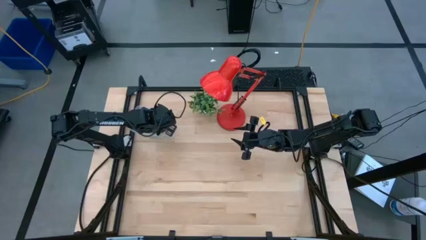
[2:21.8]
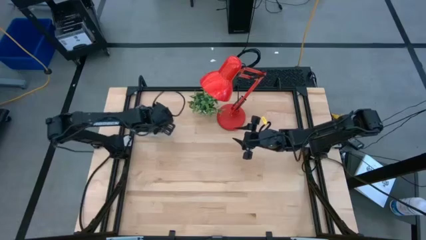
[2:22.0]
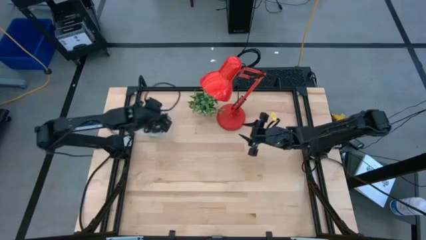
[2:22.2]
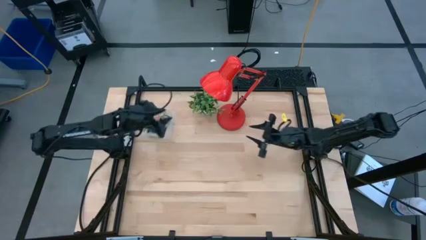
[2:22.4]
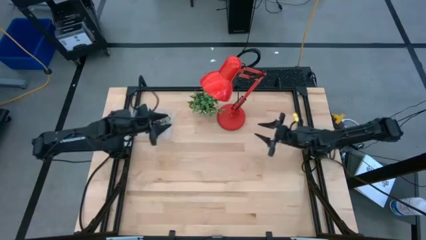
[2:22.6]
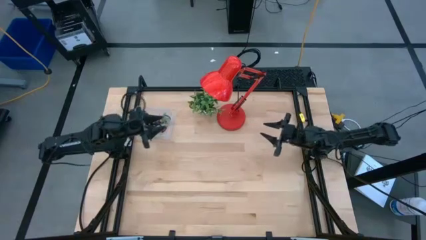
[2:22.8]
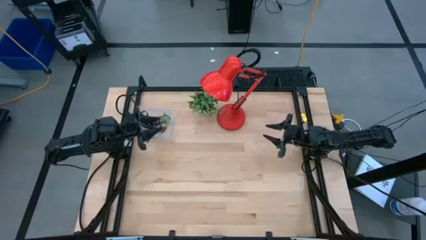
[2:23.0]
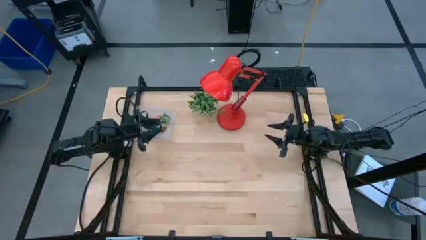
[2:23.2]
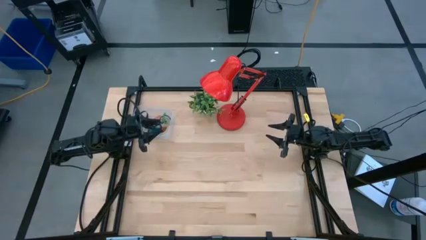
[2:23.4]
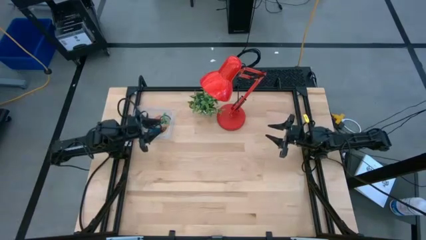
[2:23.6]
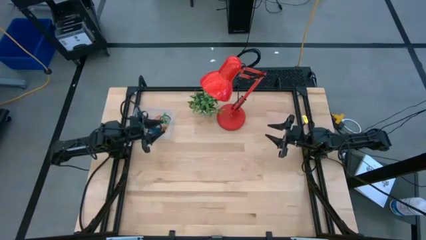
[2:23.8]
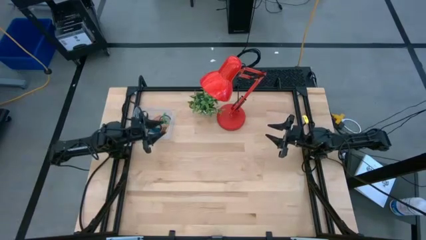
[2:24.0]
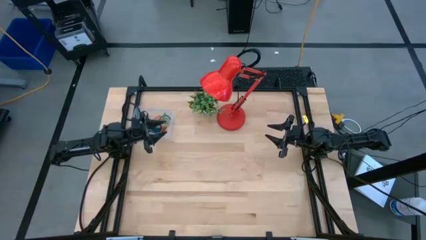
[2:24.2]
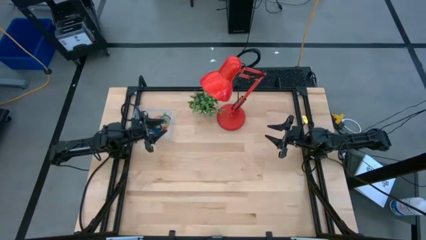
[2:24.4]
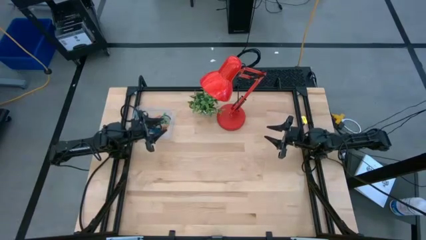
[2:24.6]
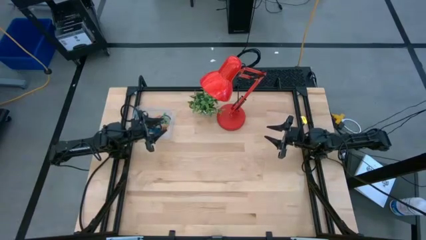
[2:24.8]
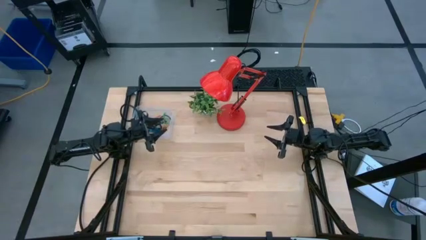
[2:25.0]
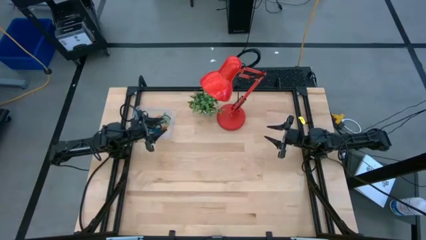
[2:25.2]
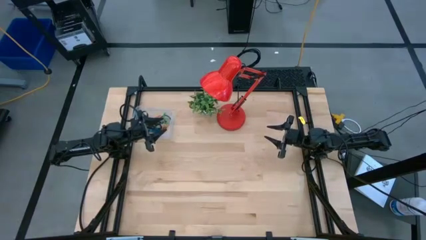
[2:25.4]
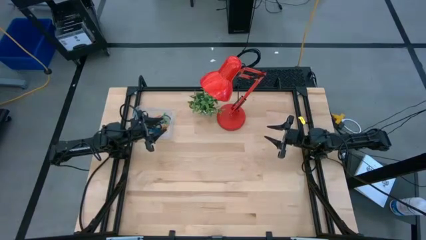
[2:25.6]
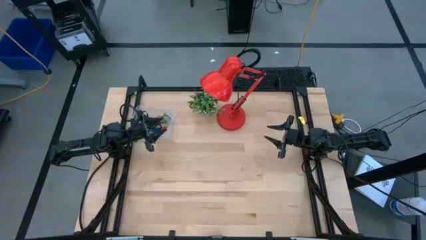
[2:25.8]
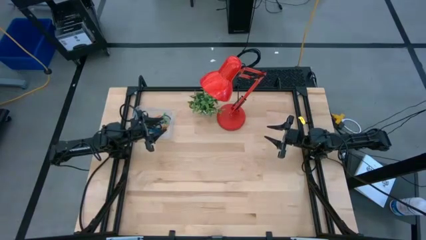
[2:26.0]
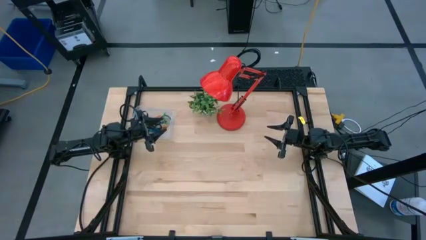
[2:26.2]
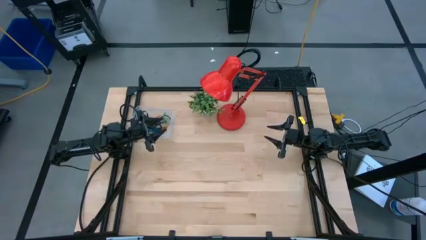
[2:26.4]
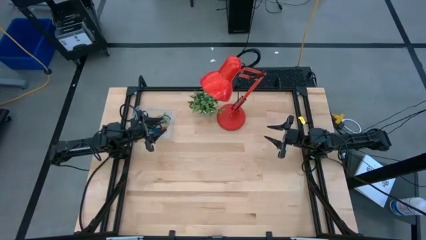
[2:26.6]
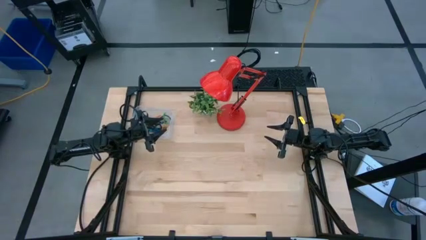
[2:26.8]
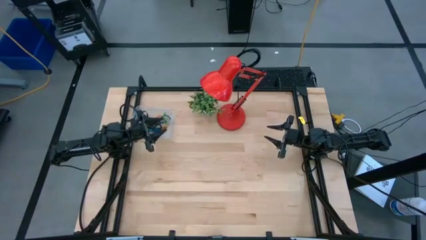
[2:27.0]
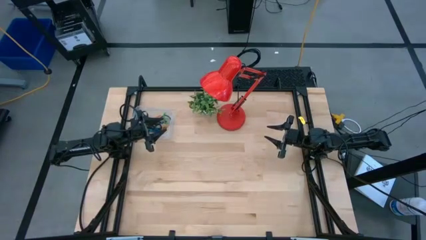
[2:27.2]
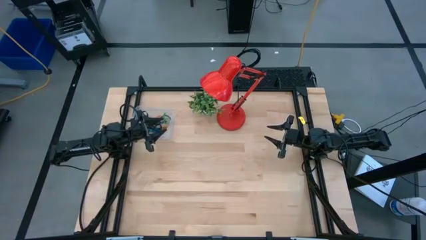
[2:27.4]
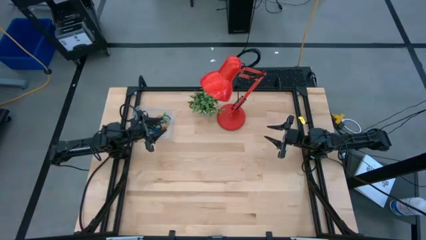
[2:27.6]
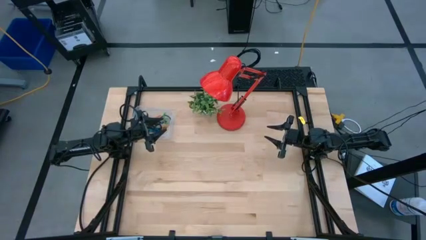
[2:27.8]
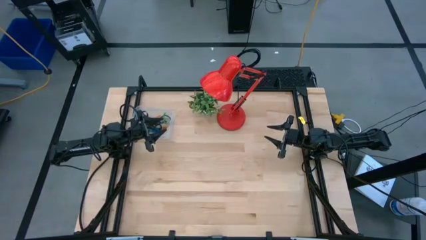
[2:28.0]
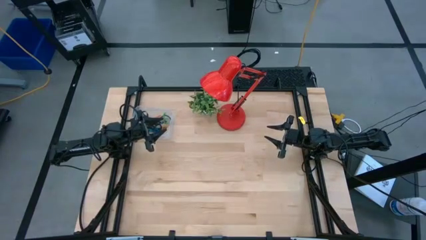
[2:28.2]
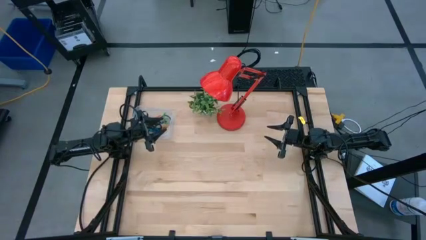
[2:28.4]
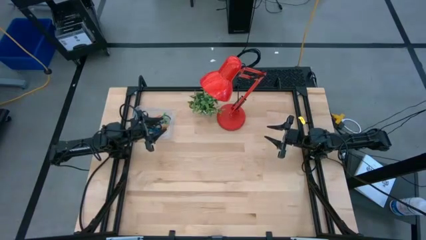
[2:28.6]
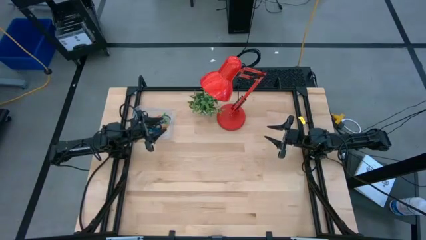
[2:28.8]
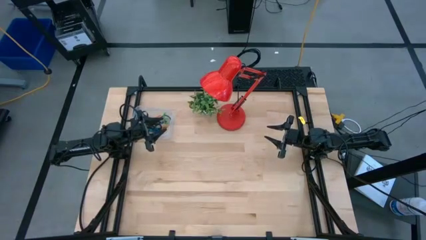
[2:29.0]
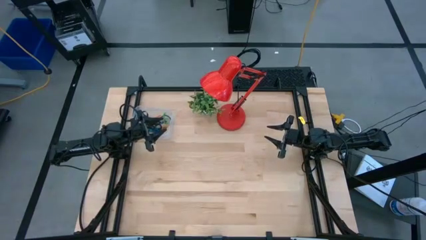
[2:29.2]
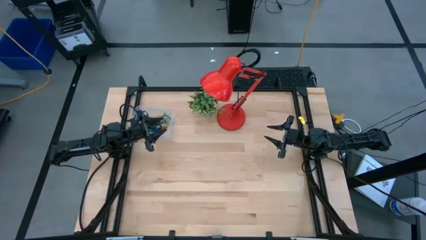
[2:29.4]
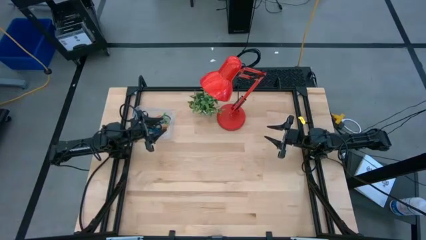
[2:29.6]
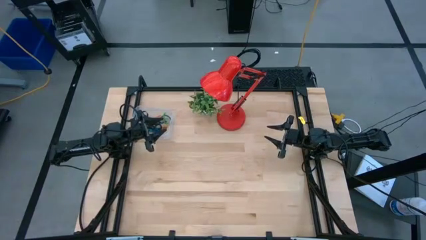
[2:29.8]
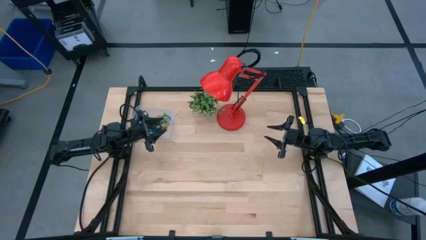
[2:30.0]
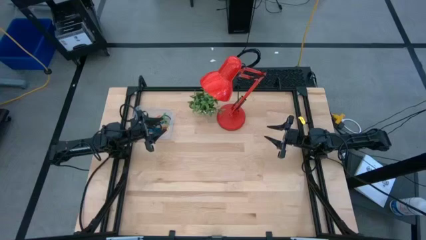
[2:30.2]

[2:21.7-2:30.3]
Task: Pick and place rubber bands into bin
Return to Home Position

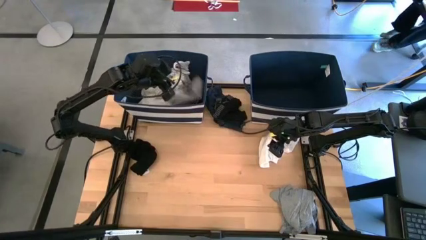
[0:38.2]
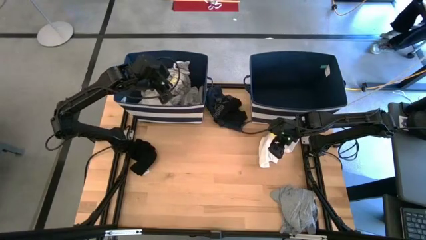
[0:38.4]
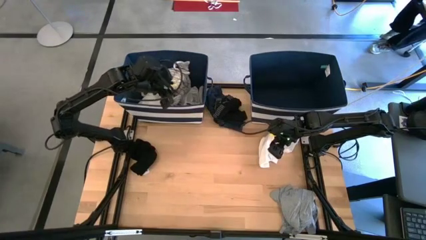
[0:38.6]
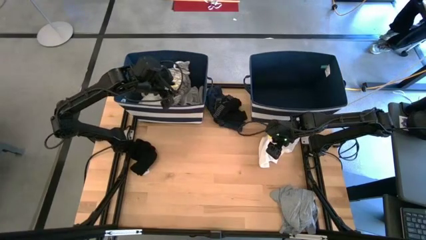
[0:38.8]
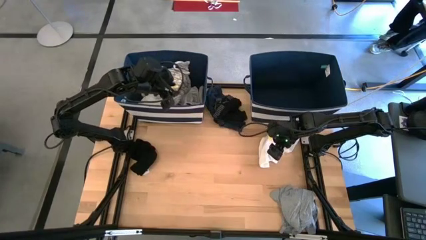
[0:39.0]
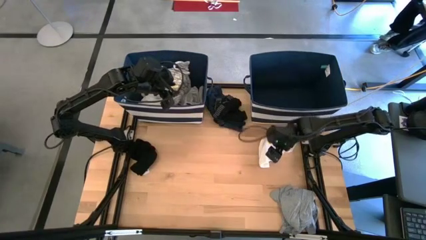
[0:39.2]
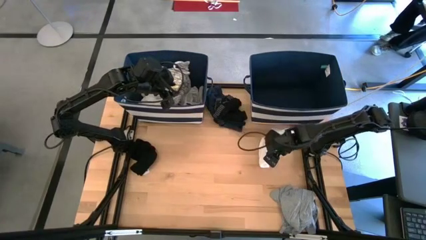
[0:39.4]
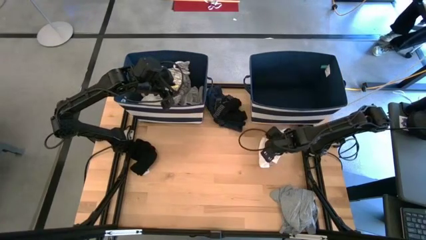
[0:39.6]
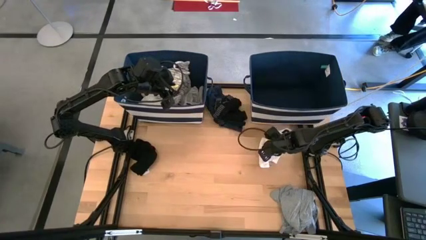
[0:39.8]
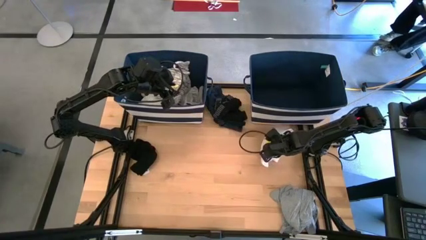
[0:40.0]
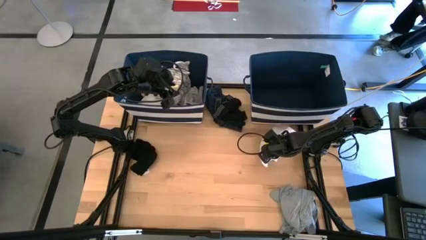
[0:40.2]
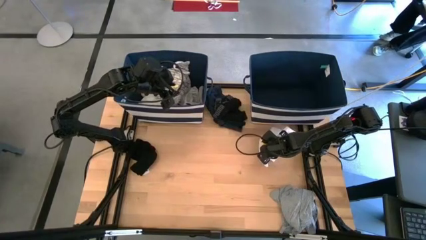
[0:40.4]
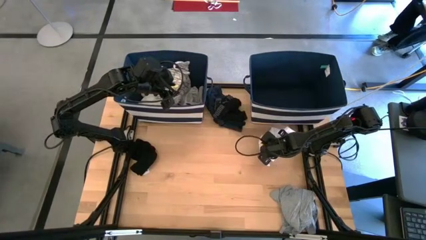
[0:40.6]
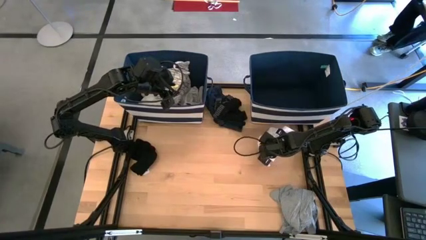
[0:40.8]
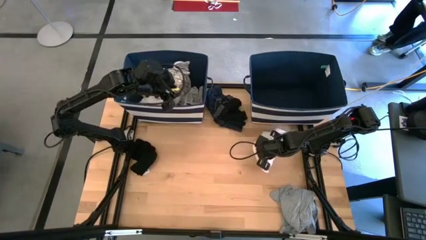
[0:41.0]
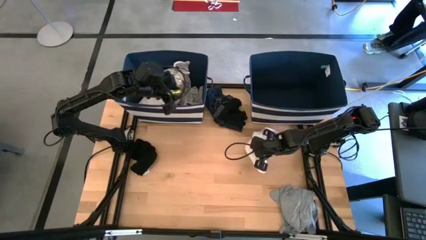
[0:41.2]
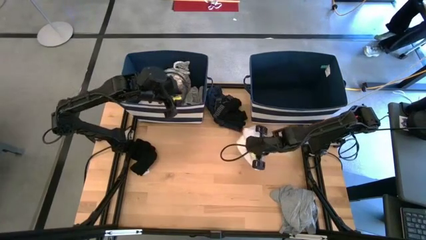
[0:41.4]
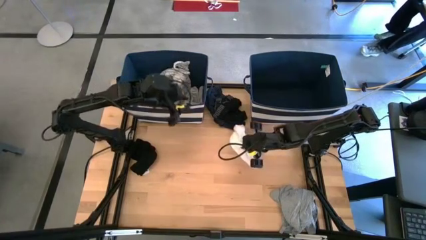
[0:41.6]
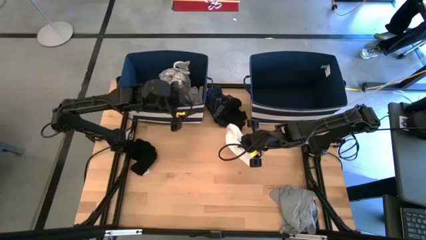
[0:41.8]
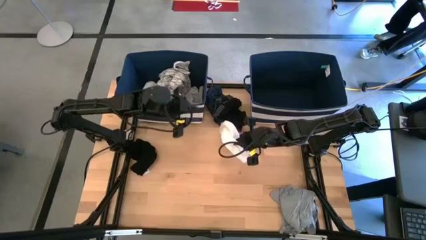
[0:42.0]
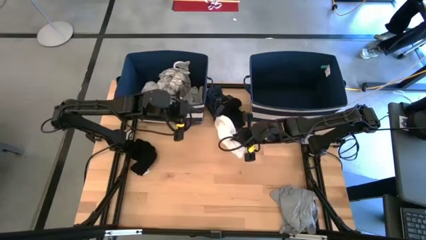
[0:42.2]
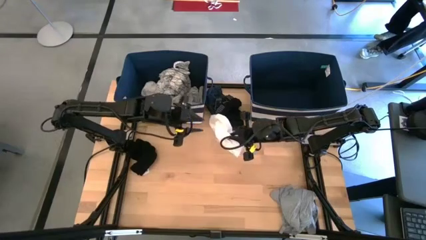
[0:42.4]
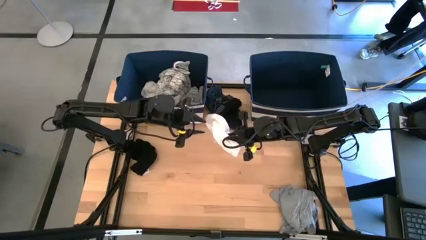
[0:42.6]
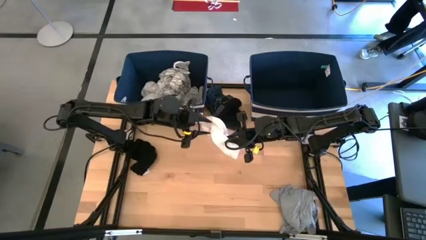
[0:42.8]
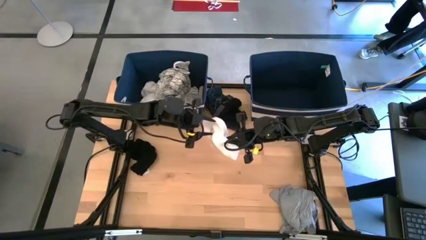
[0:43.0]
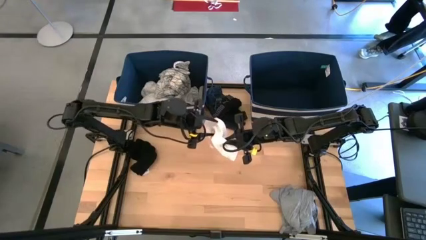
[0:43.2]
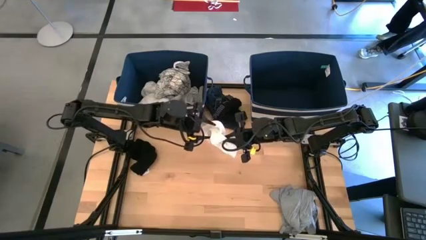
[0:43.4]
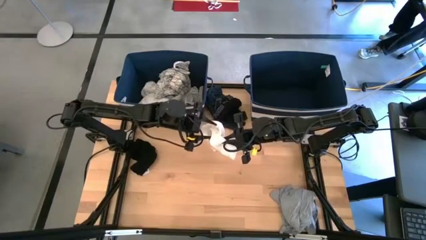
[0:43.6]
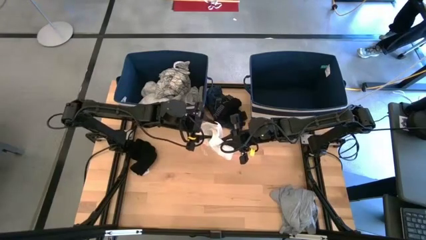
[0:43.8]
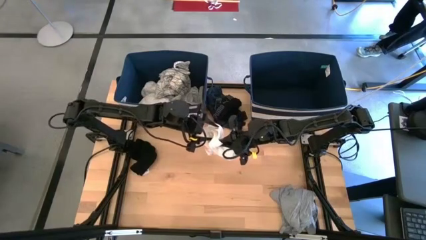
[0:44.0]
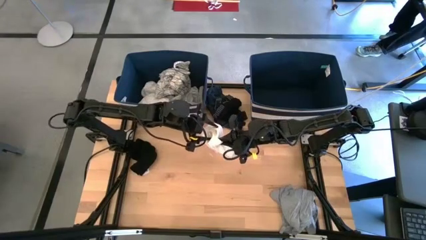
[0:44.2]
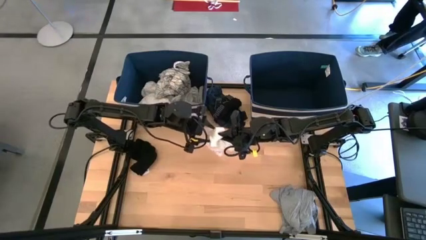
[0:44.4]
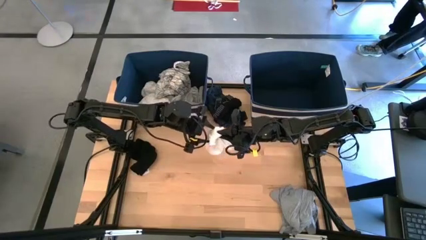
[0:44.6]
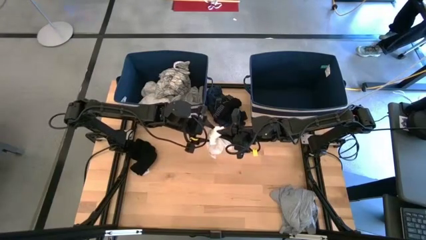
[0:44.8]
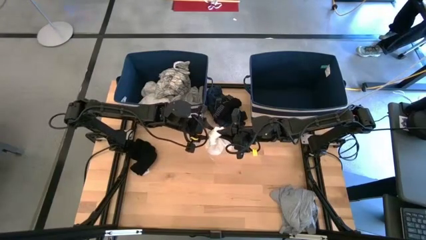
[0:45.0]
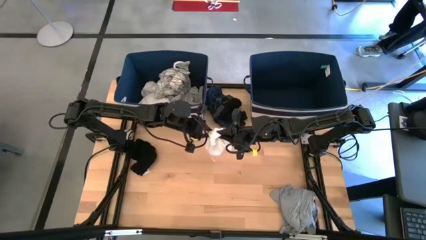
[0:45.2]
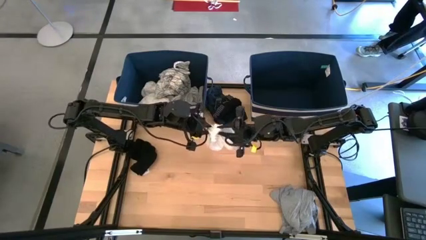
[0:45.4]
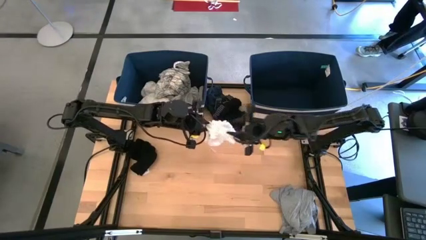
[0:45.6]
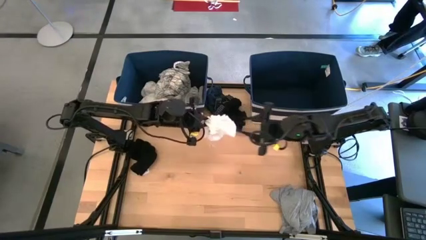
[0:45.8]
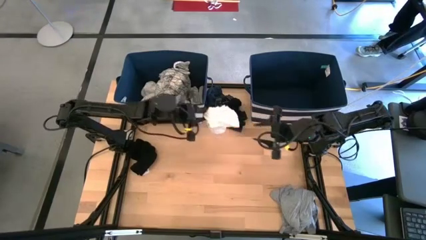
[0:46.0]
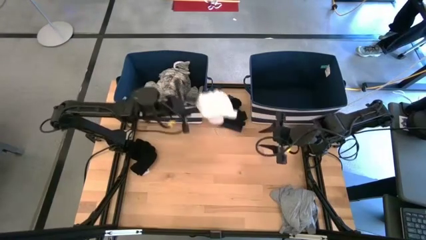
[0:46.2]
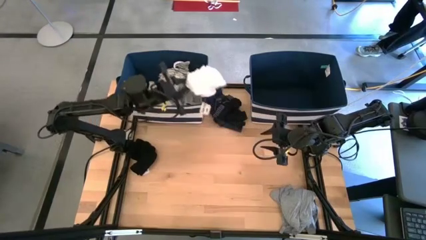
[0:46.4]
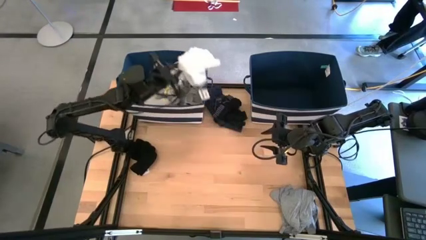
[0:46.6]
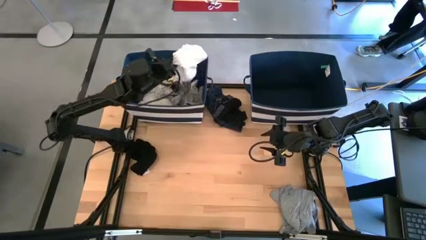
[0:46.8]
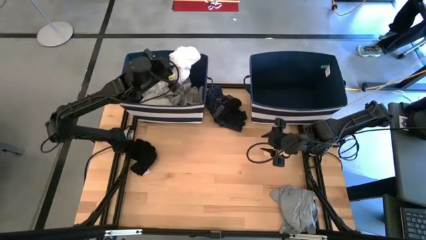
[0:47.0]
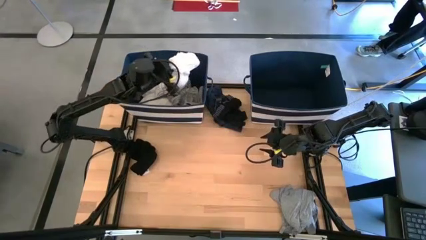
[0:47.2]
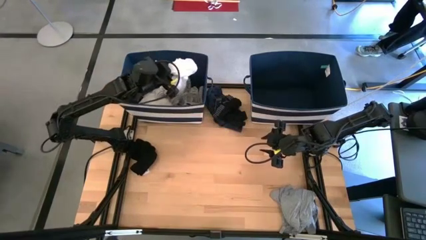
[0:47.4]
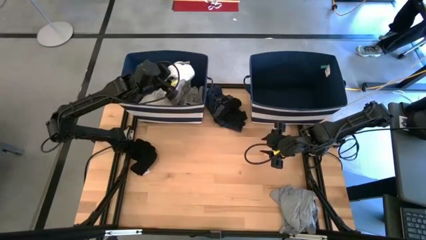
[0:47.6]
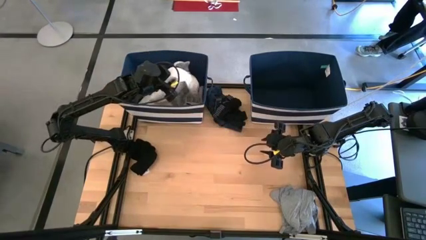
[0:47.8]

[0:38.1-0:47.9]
Task: Sort clothes
Put the white shorts into the left blue bin
